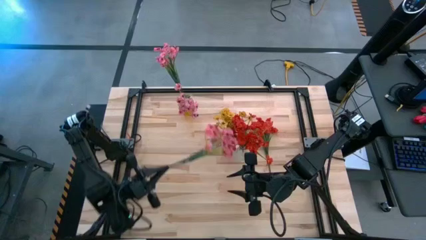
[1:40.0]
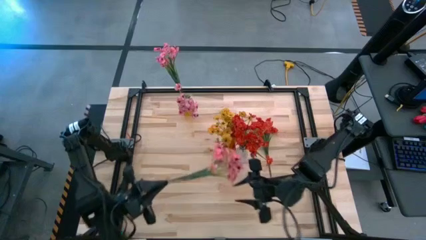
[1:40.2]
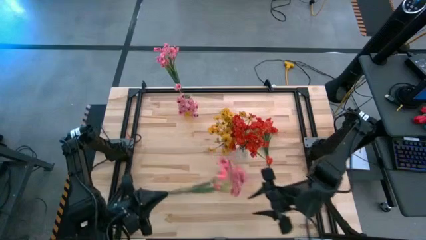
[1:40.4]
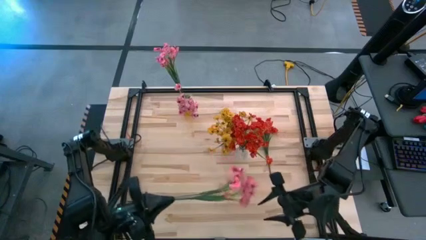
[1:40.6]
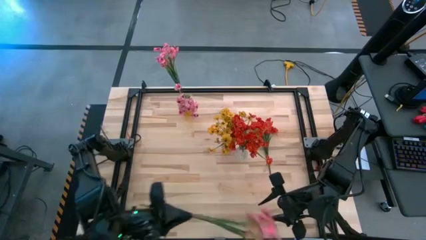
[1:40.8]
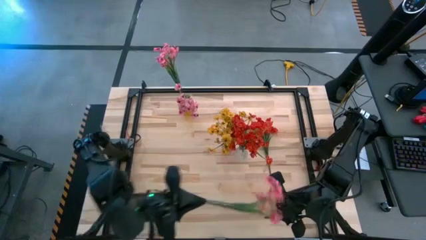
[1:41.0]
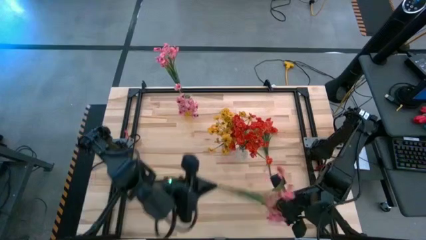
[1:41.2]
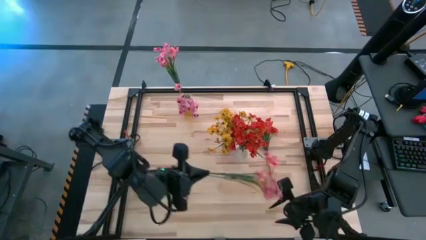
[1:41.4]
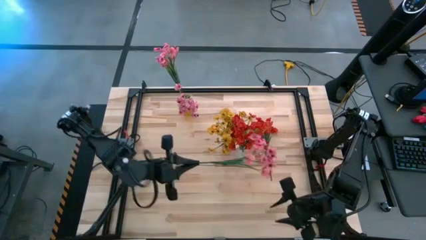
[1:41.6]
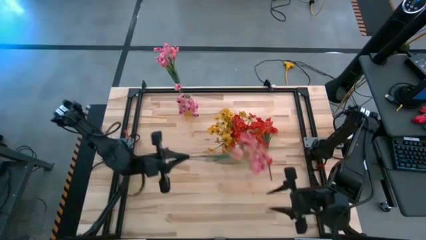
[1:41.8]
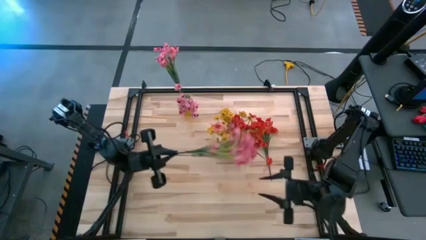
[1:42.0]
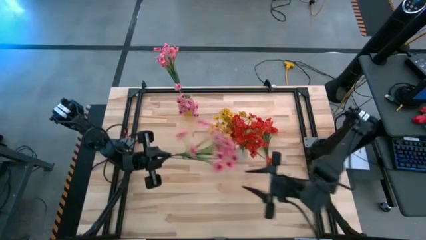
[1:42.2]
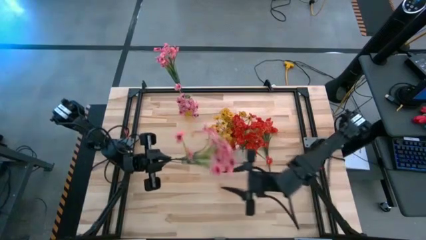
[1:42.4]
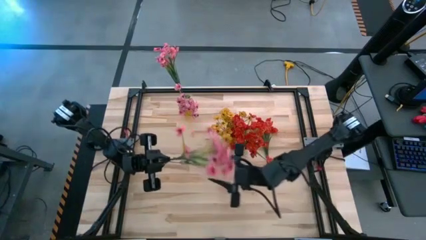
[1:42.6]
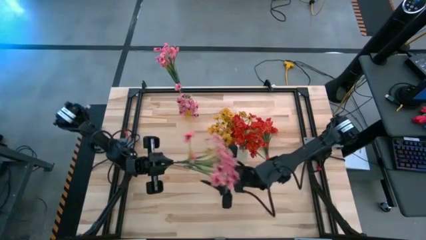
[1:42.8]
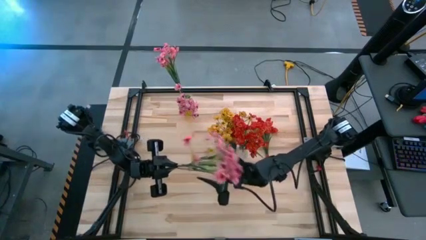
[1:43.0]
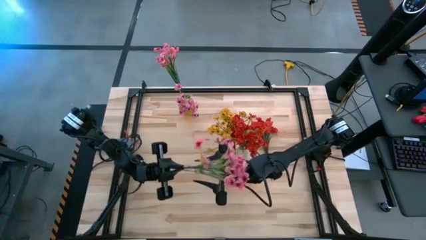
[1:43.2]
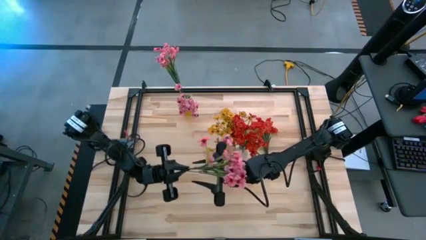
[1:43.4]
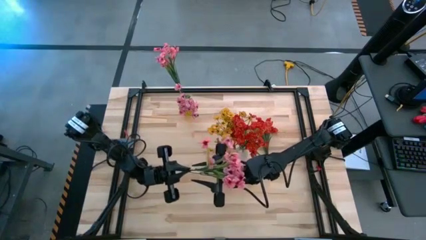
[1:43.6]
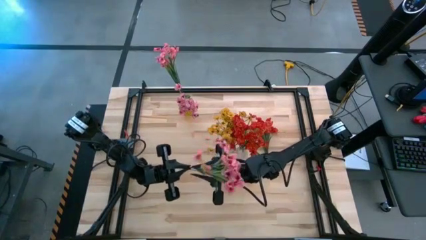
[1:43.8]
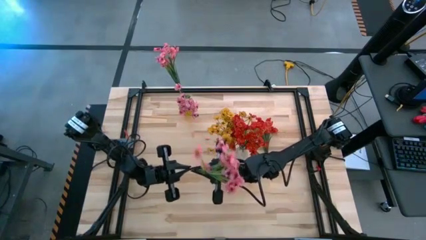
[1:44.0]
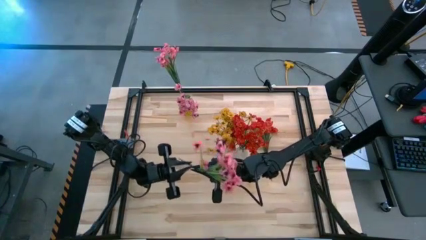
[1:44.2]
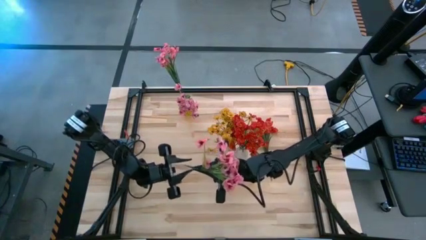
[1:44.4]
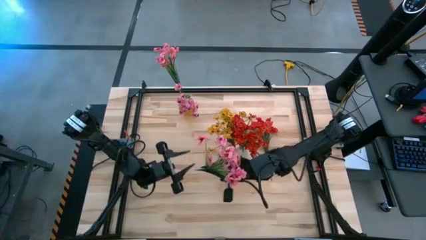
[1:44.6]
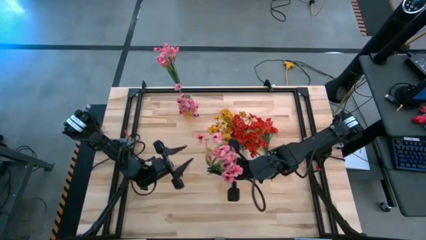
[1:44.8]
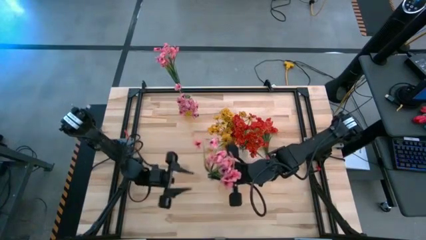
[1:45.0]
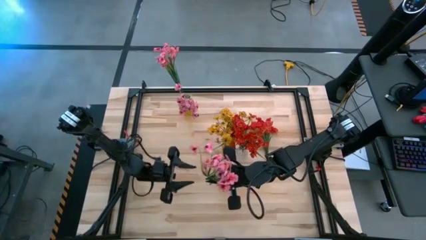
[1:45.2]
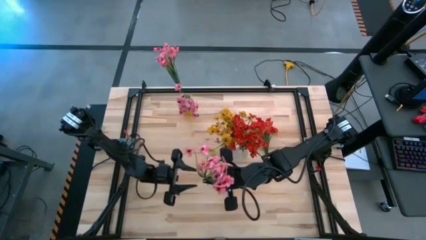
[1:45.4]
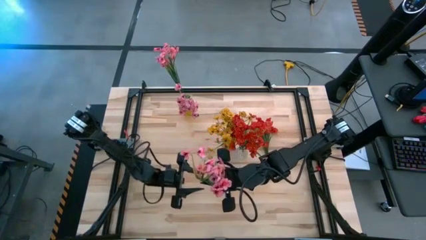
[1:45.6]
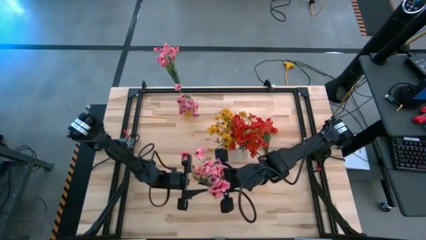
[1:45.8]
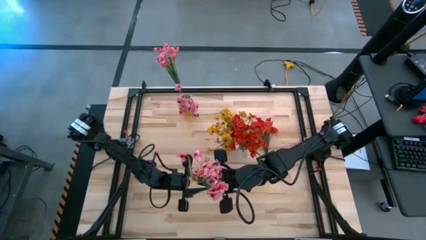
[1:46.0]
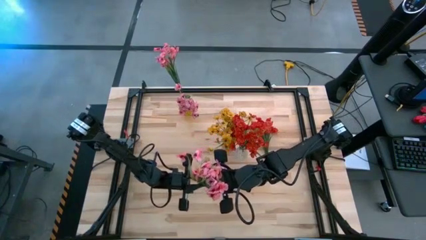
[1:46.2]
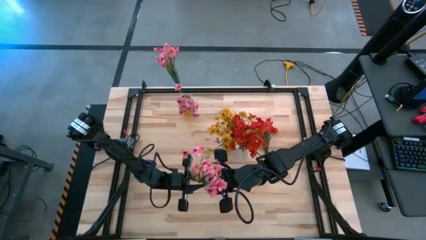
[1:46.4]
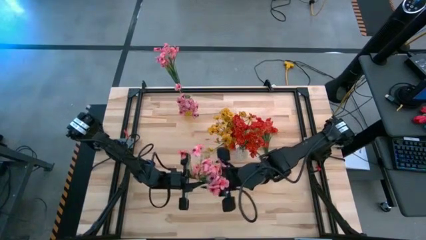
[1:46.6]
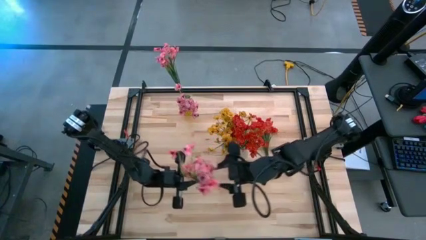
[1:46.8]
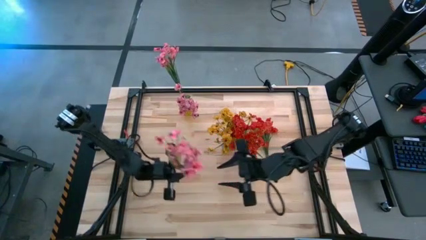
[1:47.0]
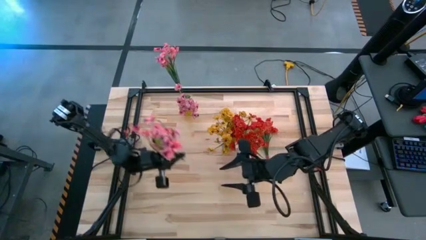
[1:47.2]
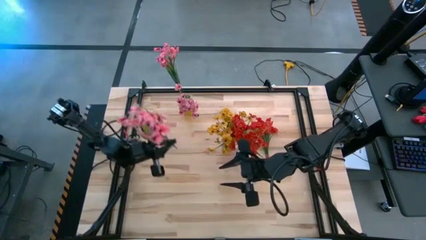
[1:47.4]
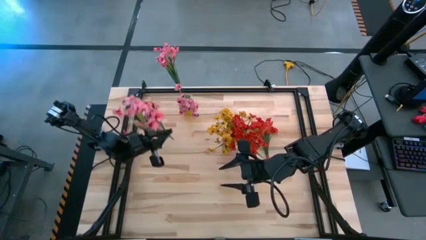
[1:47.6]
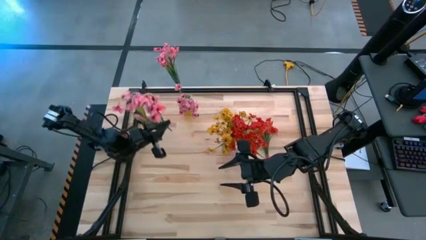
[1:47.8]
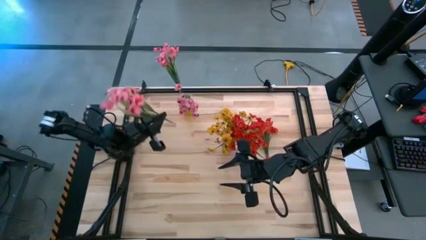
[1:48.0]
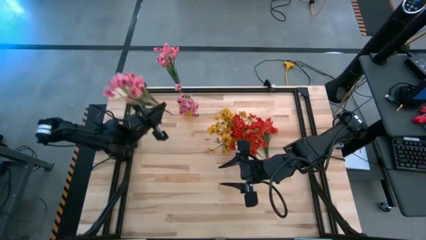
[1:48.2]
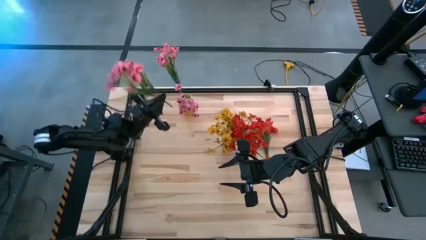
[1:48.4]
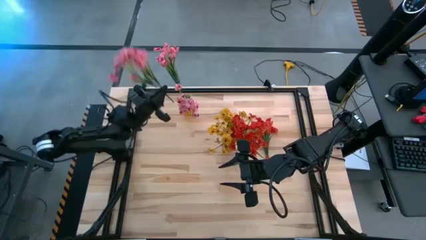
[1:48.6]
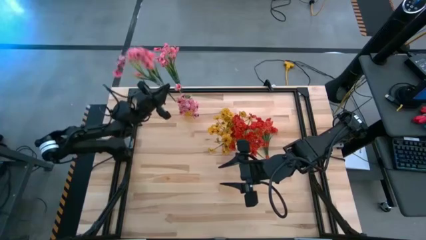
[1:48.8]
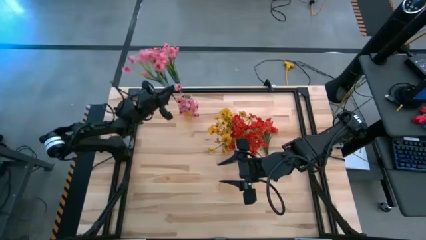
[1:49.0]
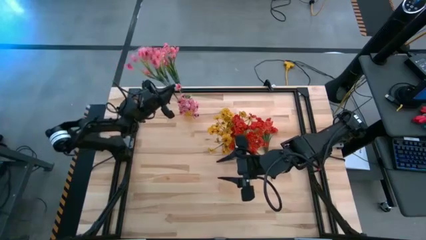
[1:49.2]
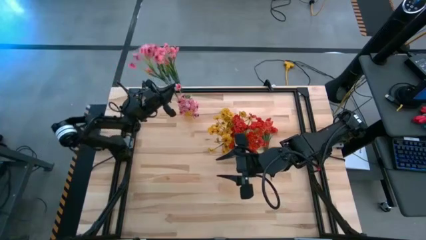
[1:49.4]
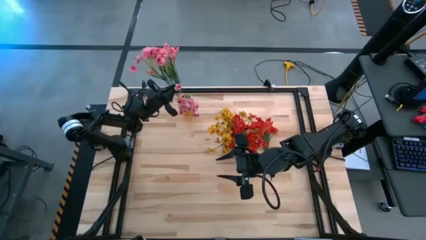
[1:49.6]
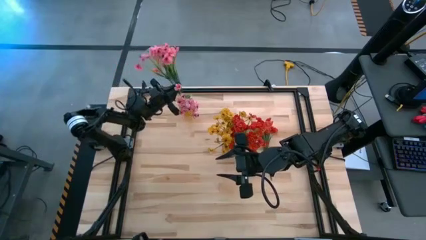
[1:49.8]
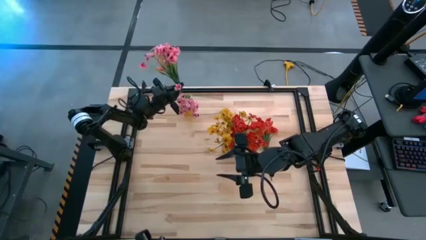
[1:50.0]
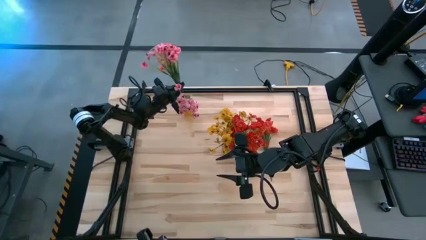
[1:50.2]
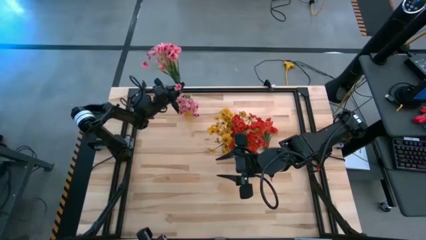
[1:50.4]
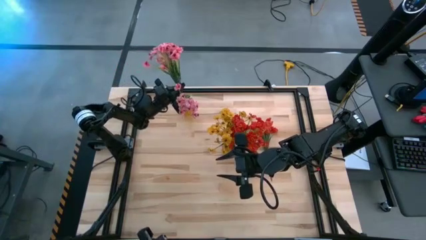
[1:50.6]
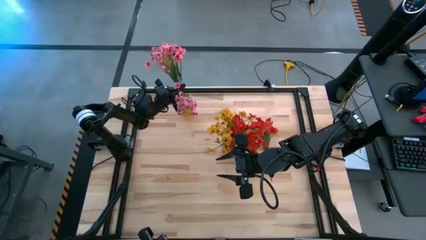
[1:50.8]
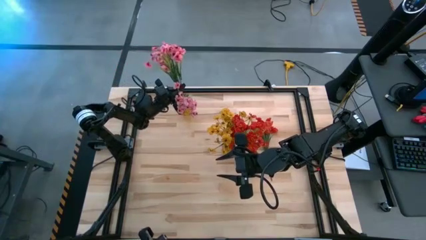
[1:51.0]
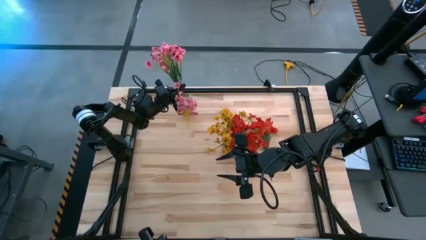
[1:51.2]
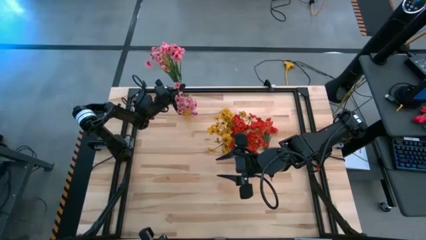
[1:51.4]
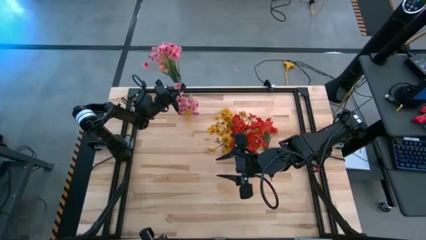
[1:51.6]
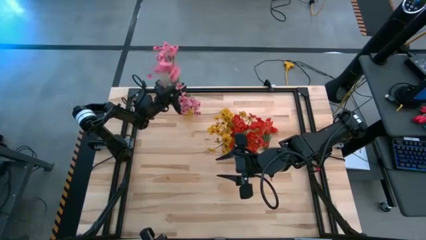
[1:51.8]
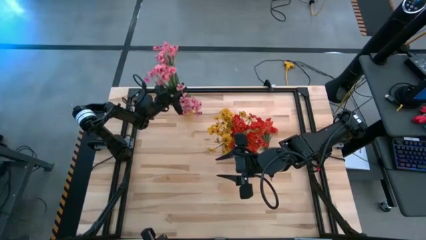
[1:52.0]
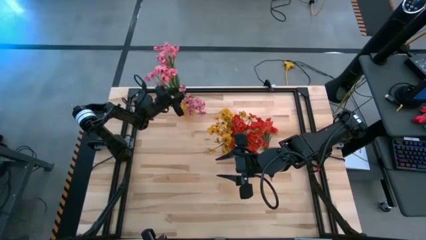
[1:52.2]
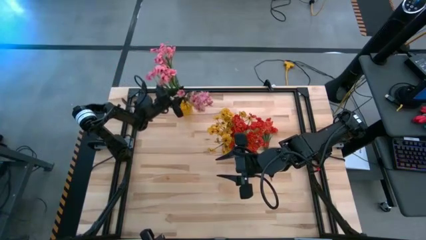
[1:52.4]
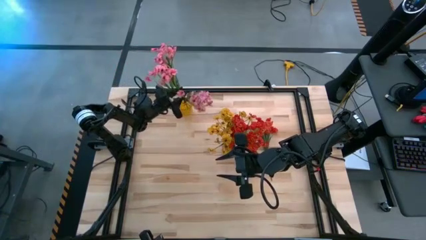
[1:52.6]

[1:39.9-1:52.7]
Task: Sort flowers into vase by color
Put the pink flowers into the yellow vase

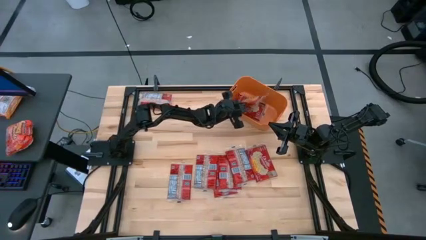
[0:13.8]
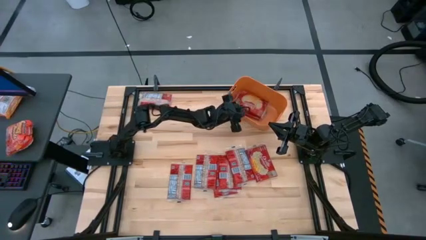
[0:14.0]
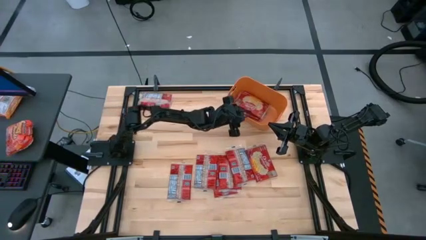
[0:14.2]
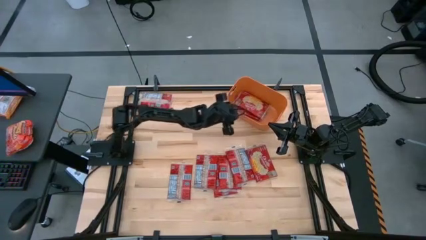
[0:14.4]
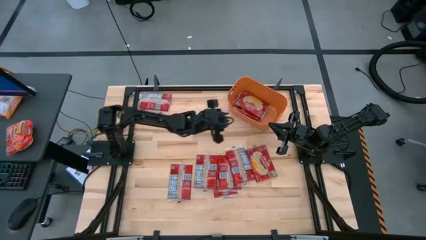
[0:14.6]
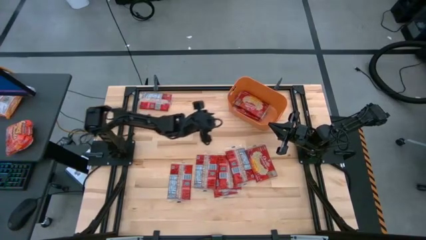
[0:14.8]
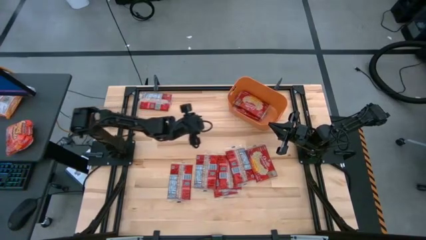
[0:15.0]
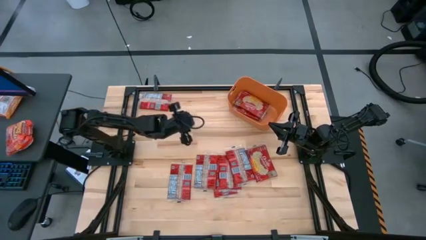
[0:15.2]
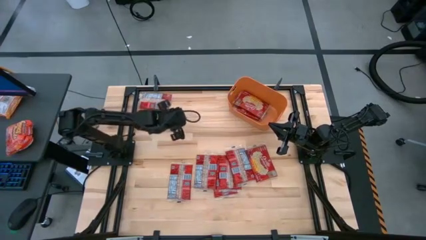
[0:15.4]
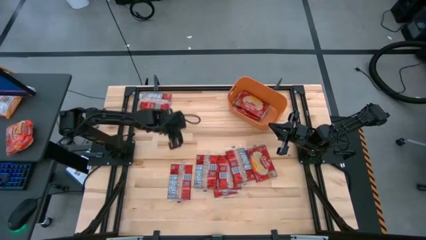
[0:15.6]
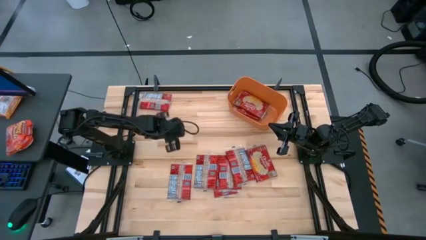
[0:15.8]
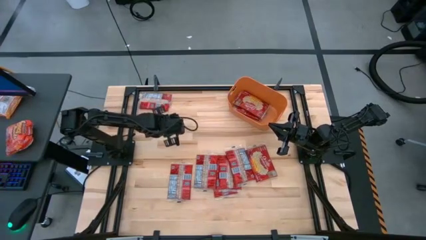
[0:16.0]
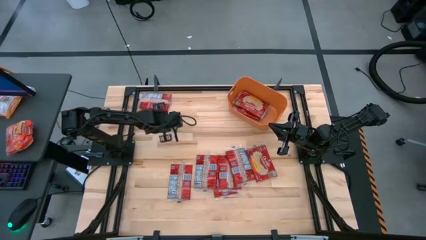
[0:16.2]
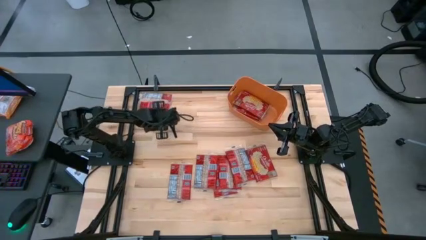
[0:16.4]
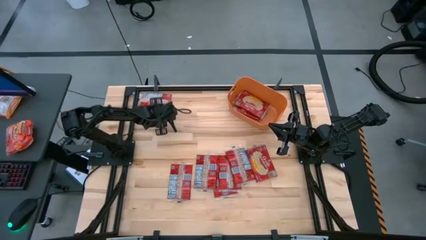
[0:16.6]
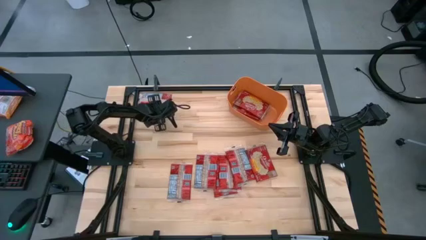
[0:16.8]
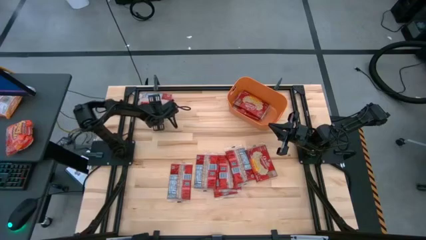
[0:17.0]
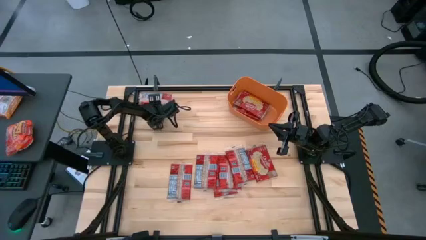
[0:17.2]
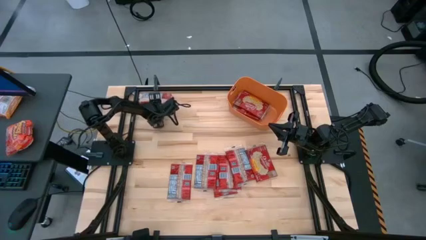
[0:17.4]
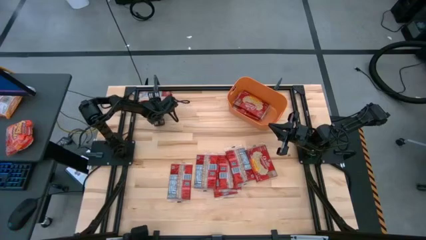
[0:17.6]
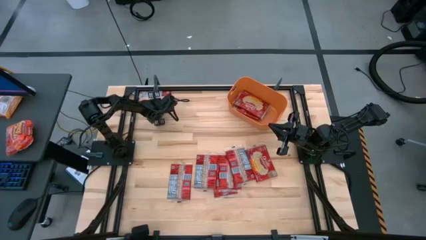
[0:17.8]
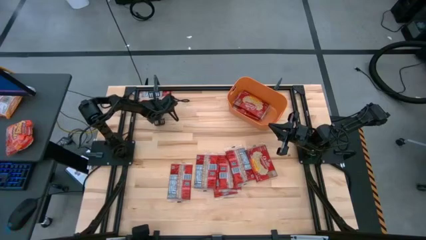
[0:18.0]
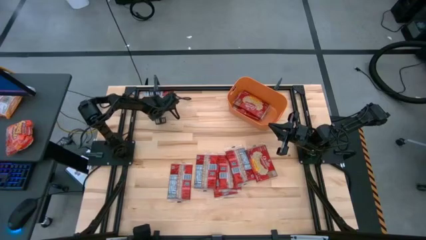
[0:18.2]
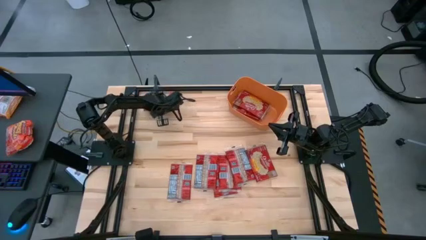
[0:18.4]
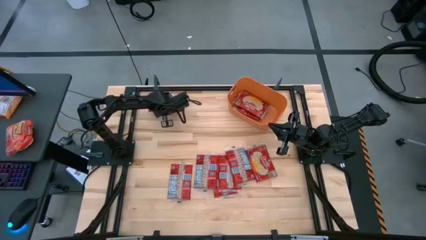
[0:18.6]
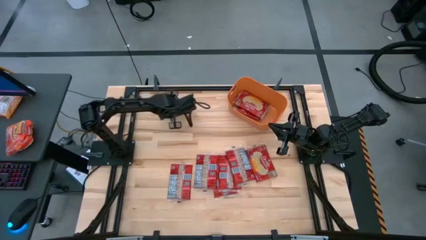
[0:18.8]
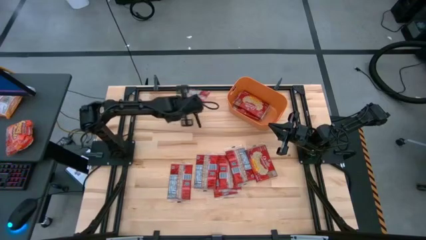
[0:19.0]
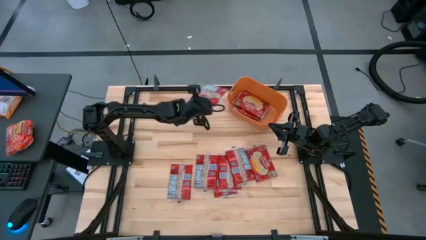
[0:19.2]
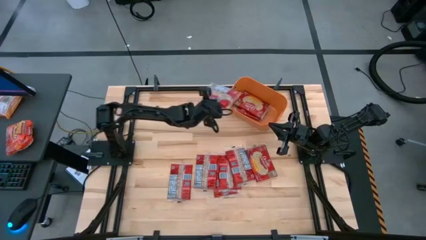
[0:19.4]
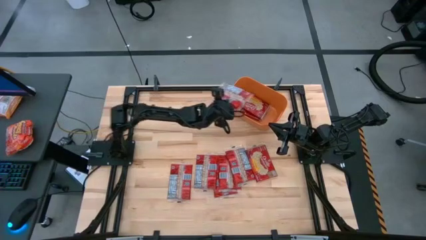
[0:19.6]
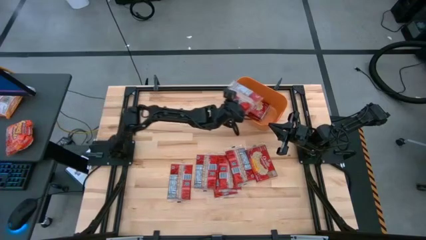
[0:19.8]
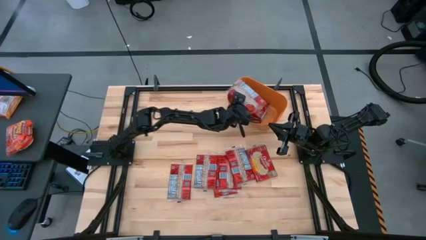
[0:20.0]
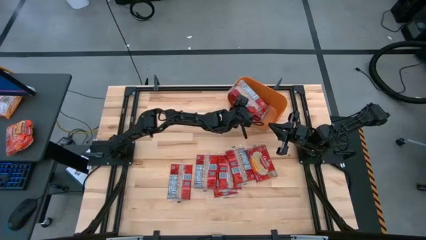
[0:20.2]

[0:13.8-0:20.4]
Task: Sort popcorn bags into baskets
Put the red popcorn bag into the orange bin
